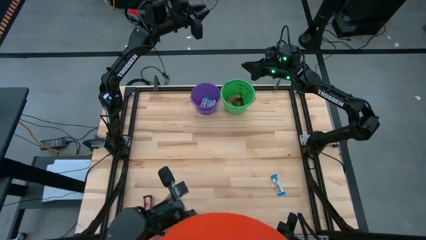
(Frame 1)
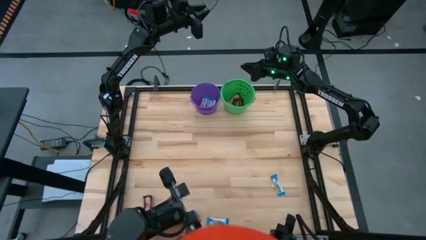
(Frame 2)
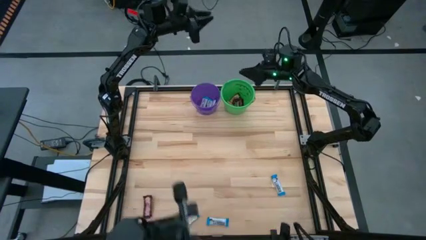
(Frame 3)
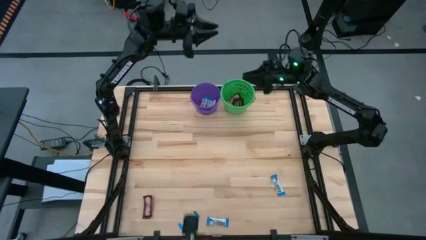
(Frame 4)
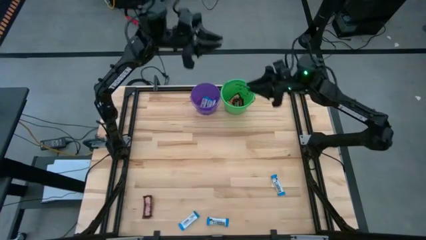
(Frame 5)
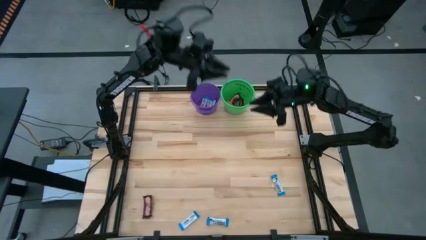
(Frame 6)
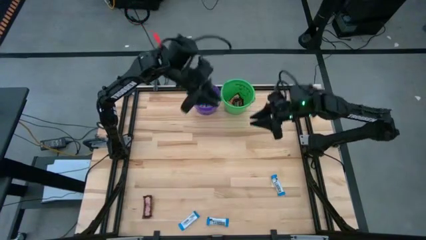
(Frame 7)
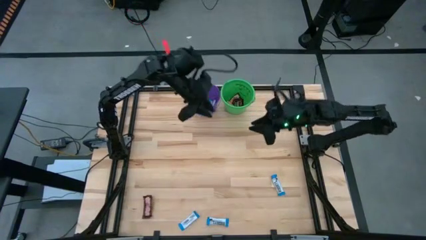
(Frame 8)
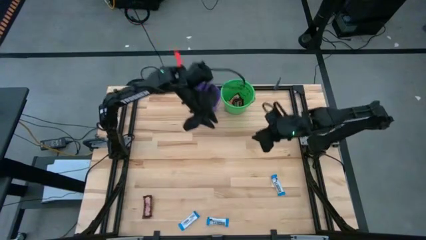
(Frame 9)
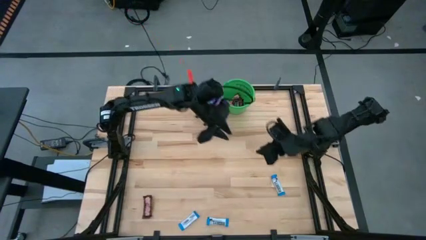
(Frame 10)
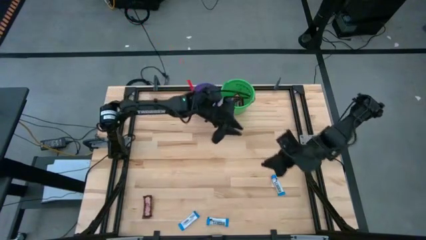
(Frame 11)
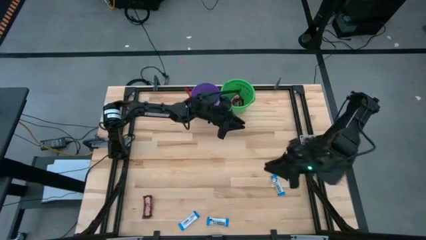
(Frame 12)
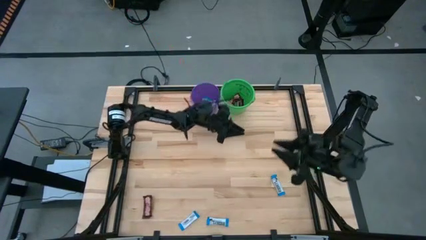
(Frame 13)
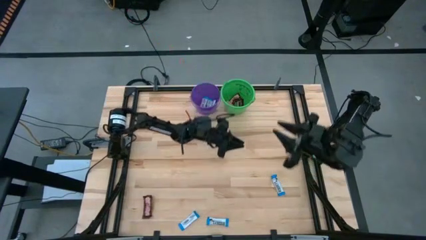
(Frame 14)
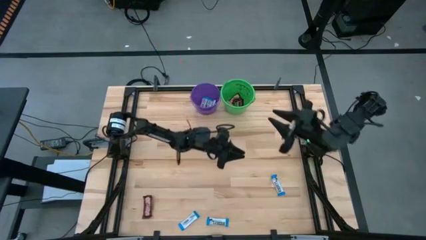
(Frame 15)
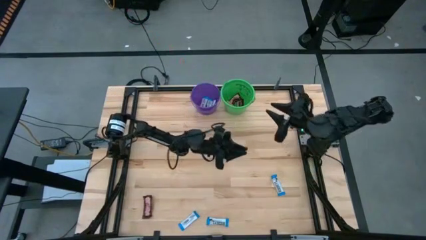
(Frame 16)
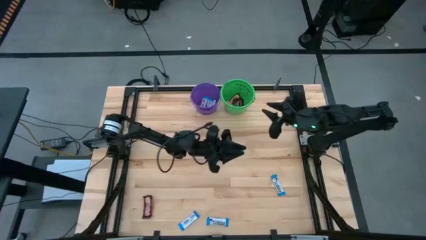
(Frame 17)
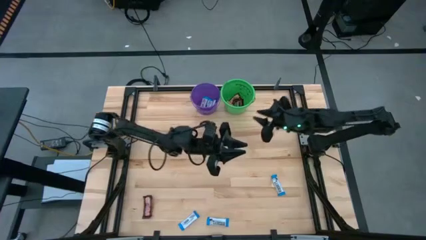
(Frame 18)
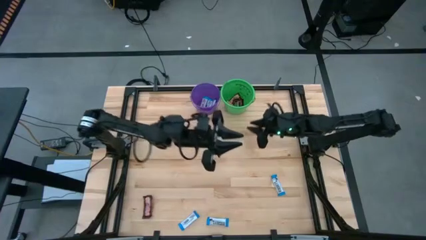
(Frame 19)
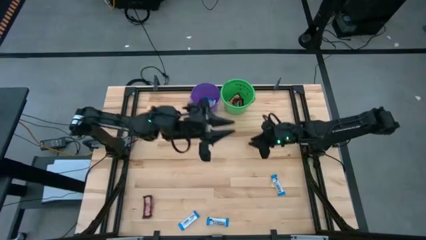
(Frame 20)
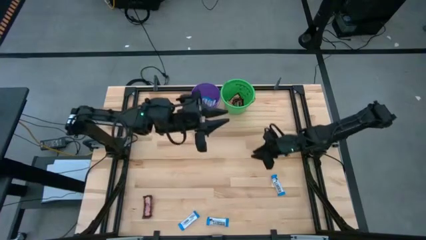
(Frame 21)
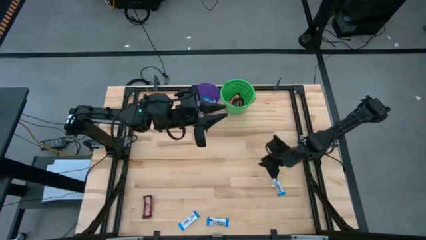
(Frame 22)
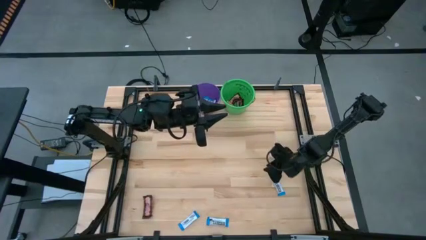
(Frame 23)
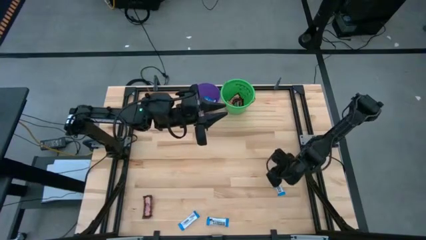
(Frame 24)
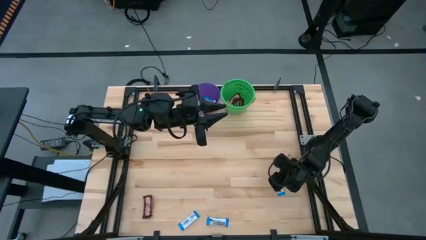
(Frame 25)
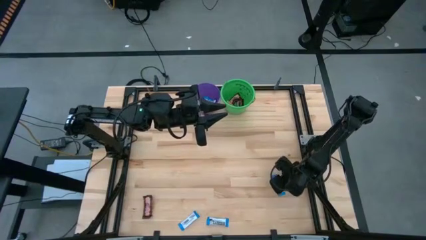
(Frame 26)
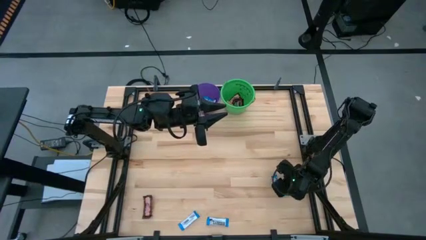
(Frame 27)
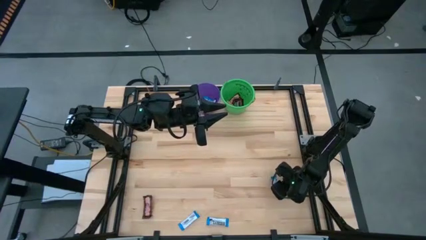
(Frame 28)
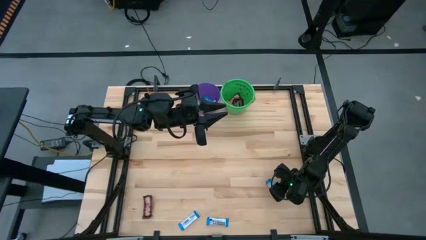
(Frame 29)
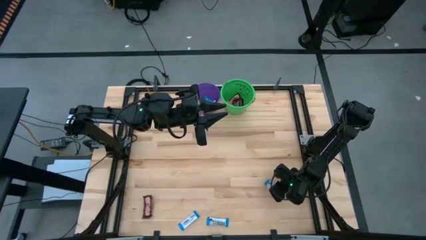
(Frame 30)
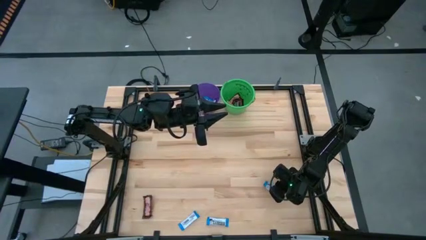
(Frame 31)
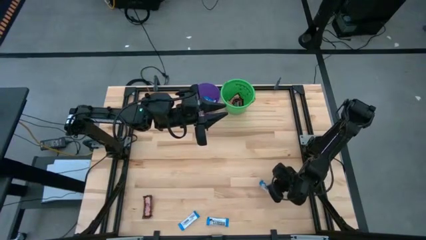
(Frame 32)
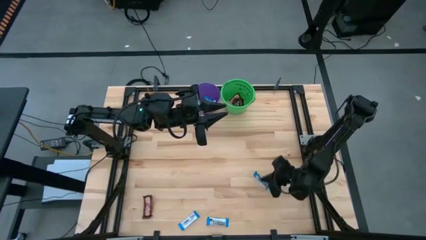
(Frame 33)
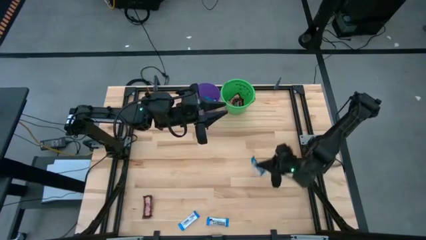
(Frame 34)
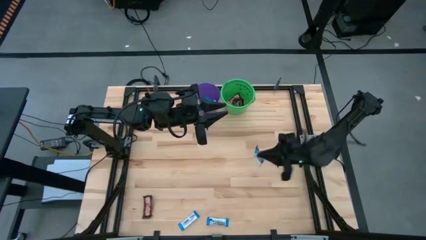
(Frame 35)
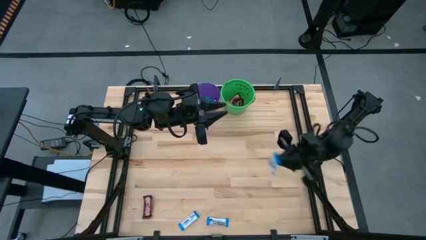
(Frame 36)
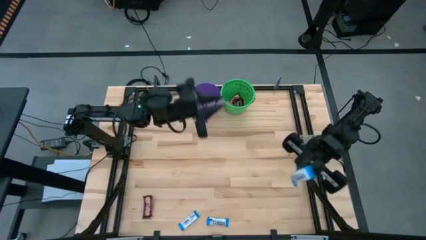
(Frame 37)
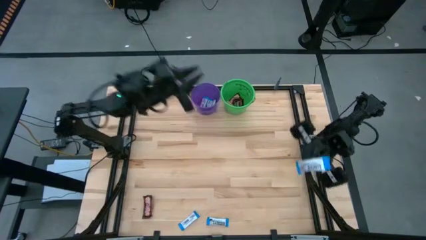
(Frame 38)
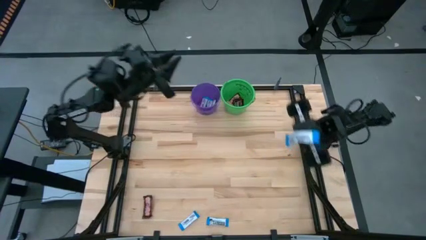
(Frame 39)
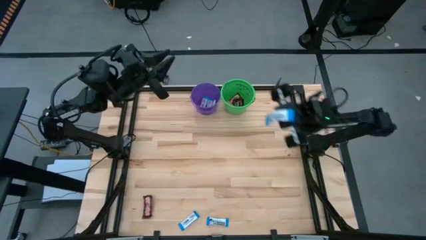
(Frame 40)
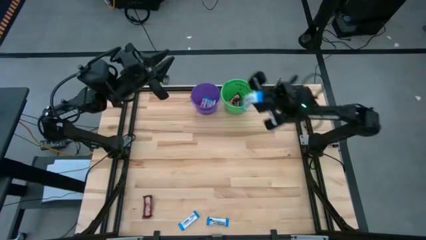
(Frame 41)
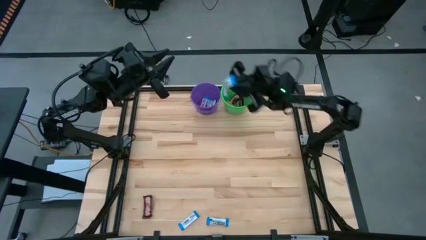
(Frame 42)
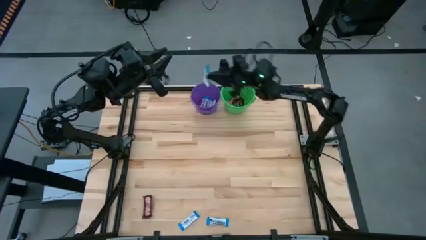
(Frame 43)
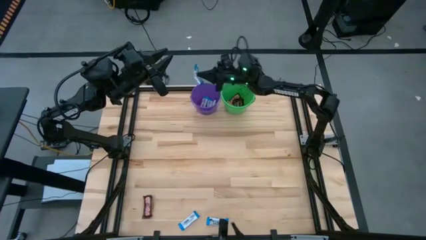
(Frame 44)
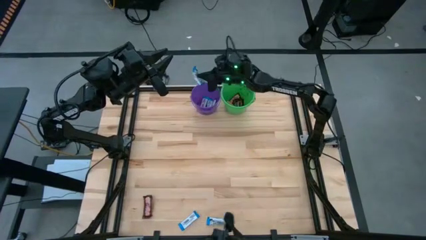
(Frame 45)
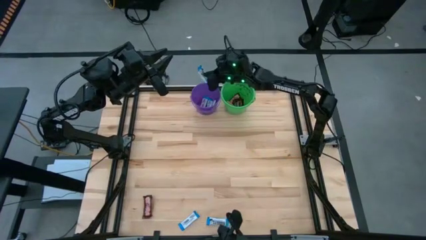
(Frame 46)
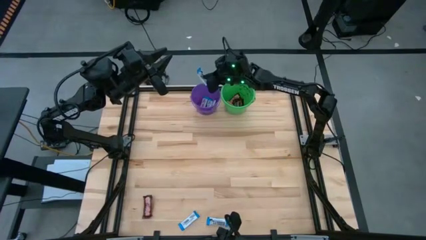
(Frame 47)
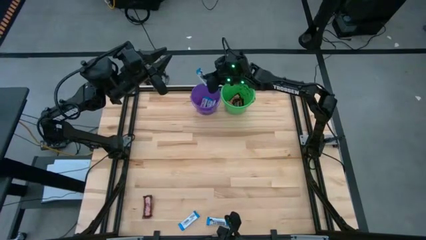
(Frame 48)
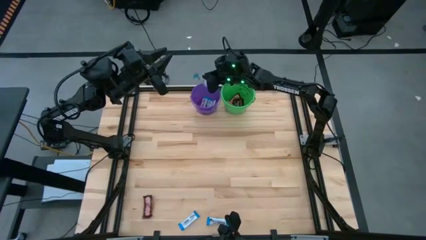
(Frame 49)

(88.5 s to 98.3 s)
Task: Sort candy by brand, put in halloween buckets
Put the white chocolate bar into the purple bucket

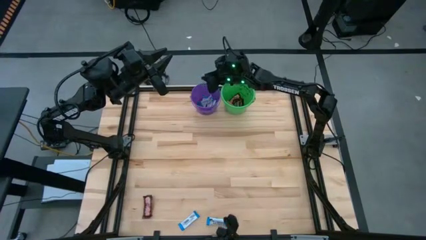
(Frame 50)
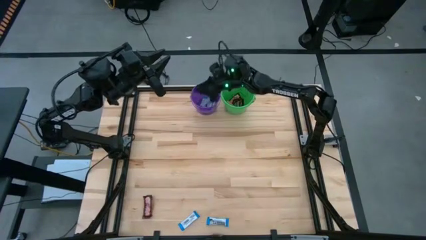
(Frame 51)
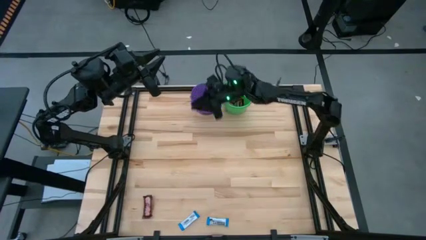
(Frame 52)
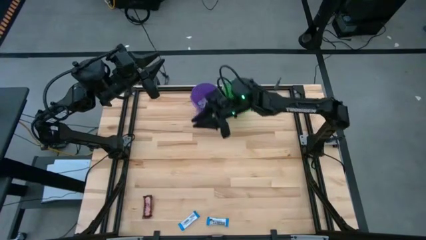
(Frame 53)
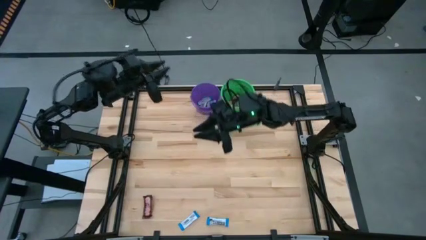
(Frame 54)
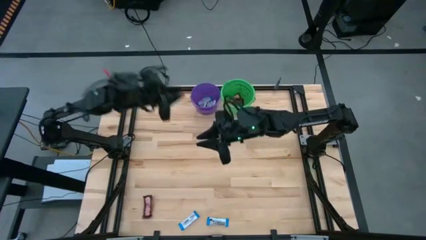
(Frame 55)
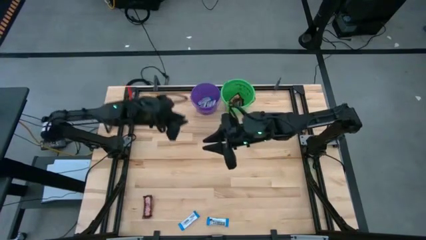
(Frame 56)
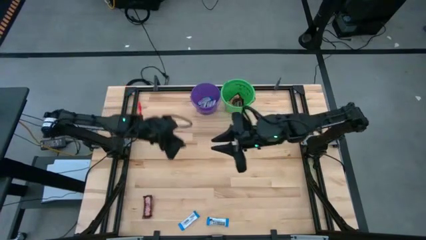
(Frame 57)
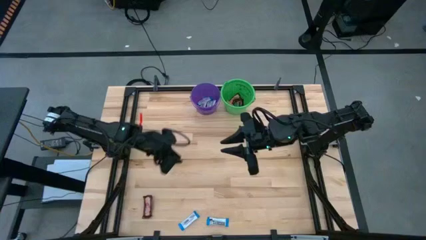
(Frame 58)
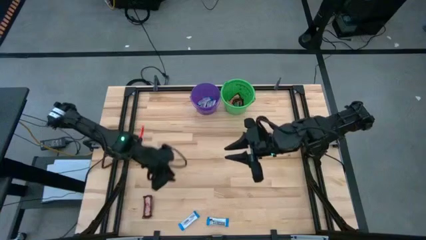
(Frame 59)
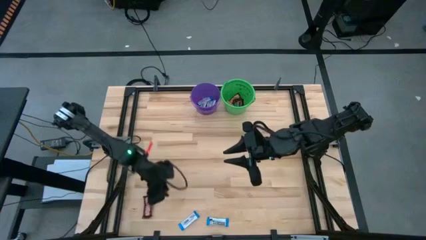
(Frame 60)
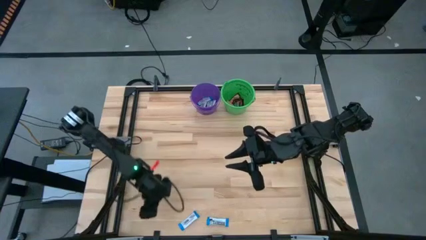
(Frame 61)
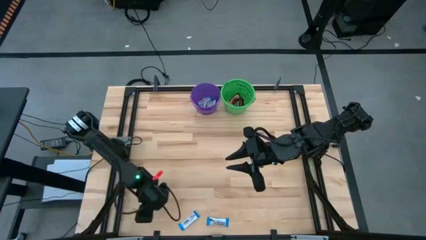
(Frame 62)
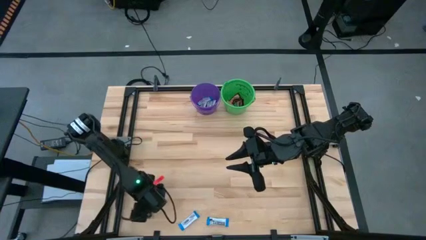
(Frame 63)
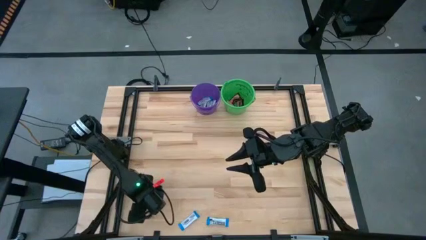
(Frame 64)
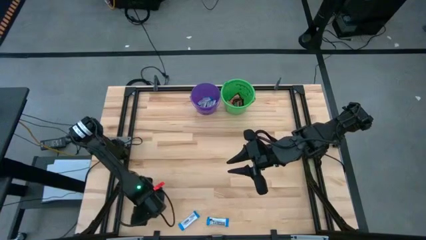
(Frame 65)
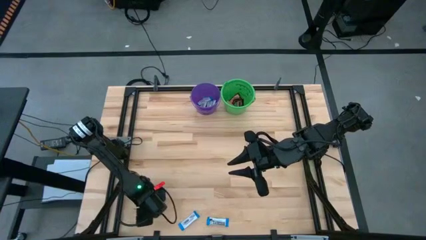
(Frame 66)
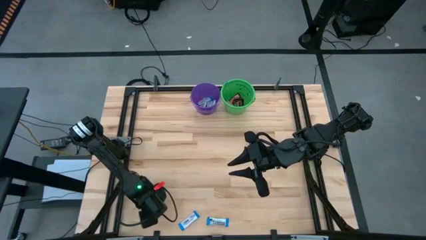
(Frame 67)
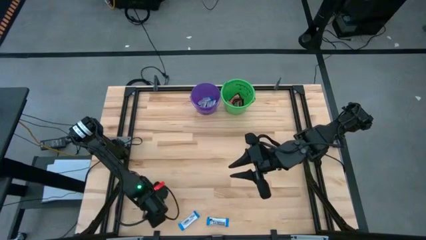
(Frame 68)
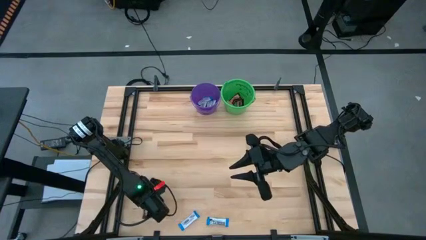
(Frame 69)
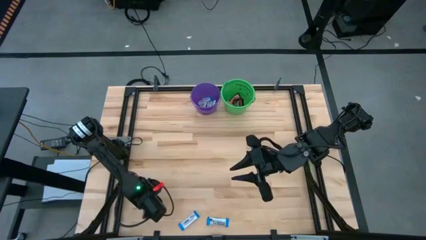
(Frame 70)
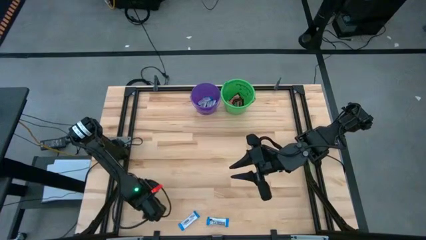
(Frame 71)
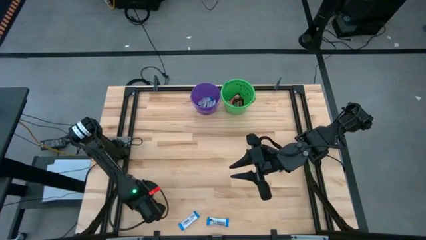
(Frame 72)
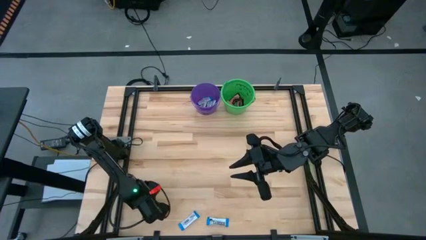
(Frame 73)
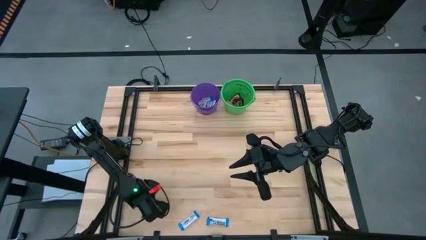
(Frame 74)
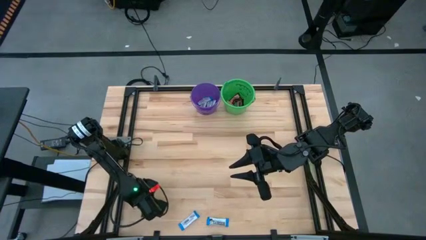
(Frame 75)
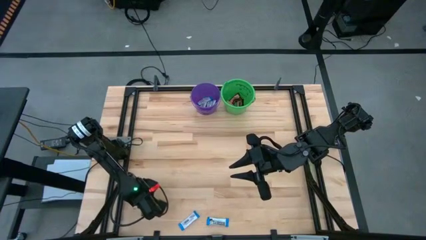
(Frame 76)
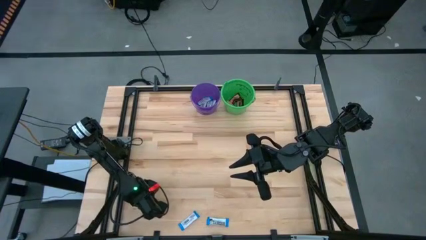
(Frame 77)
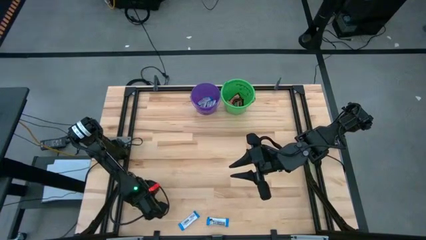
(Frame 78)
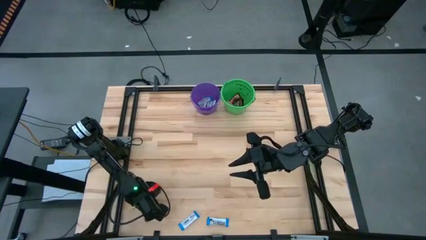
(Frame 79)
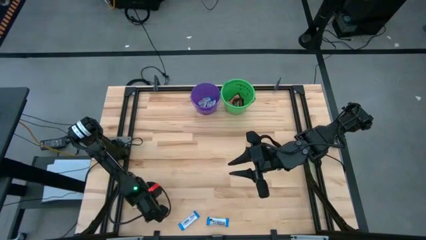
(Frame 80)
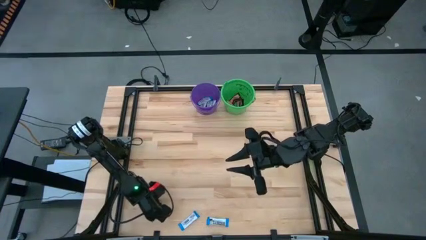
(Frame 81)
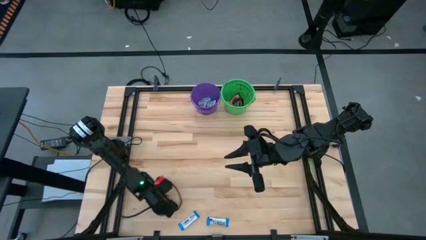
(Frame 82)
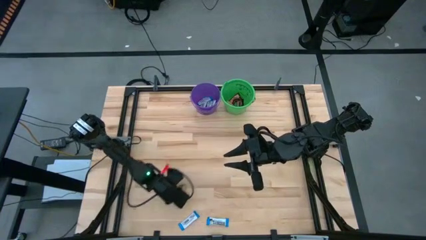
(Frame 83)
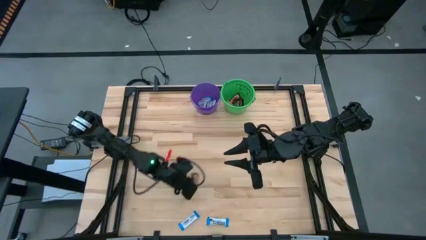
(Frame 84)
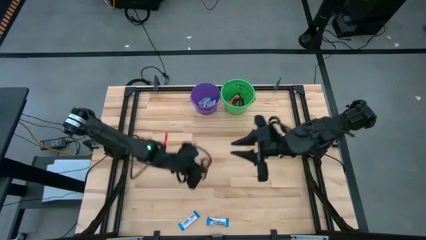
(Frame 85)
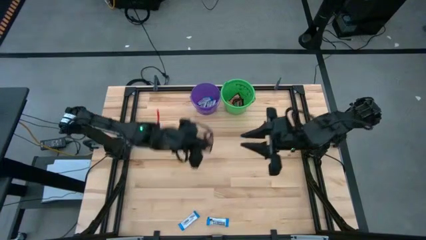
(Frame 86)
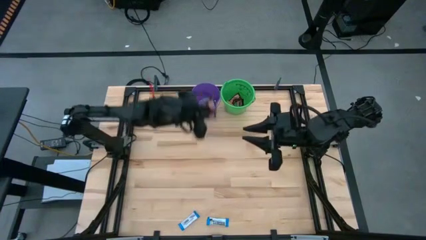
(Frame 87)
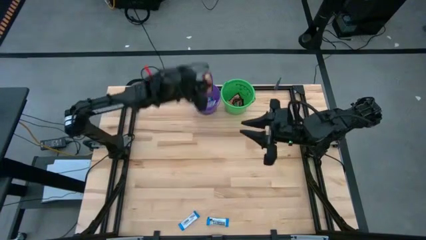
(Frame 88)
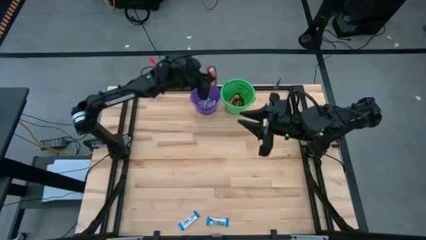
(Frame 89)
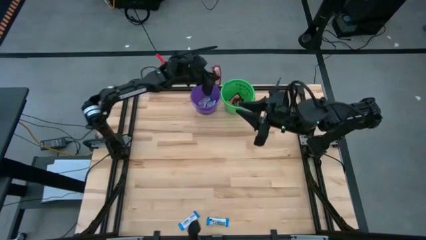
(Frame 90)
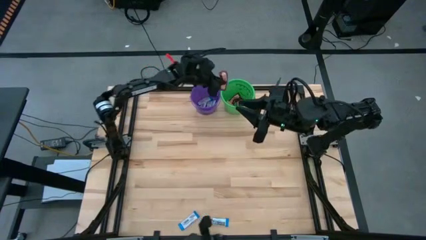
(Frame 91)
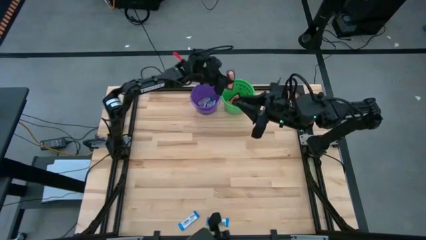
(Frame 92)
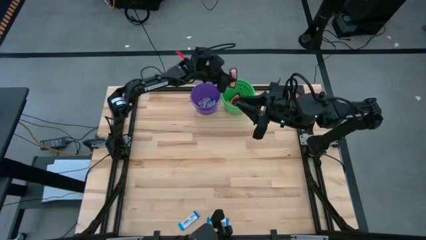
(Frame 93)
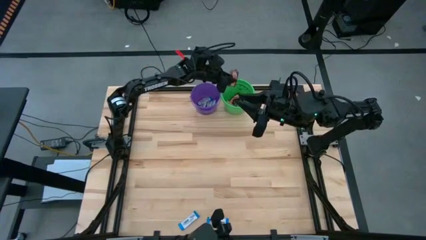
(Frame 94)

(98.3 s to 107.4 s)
Put the brown chocolate bar into the green bucket
